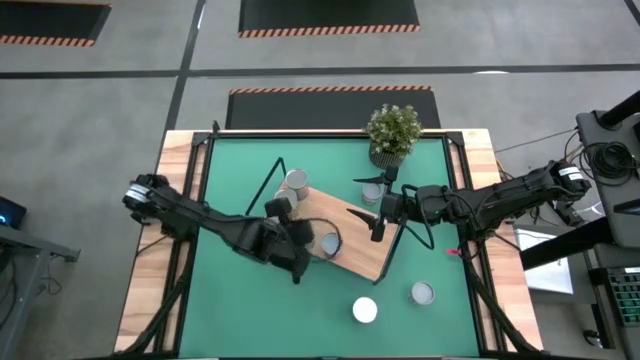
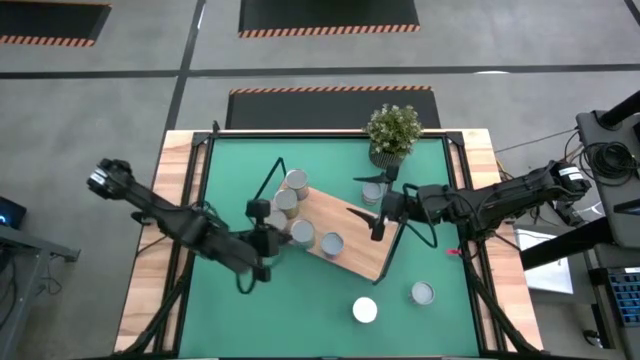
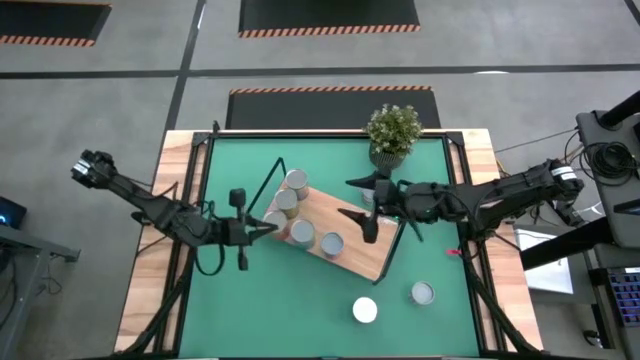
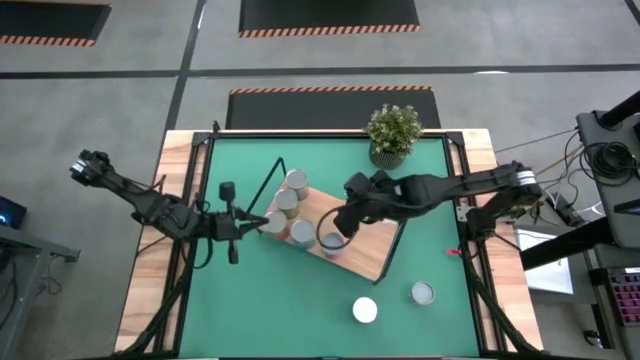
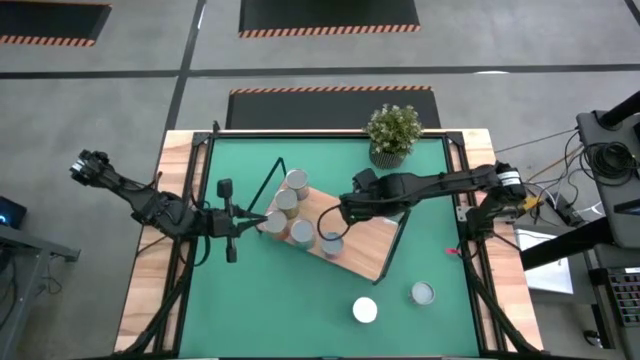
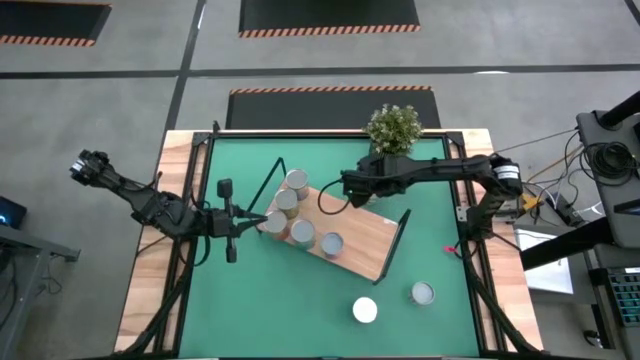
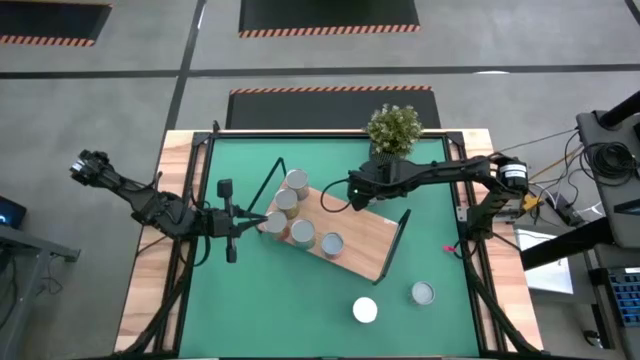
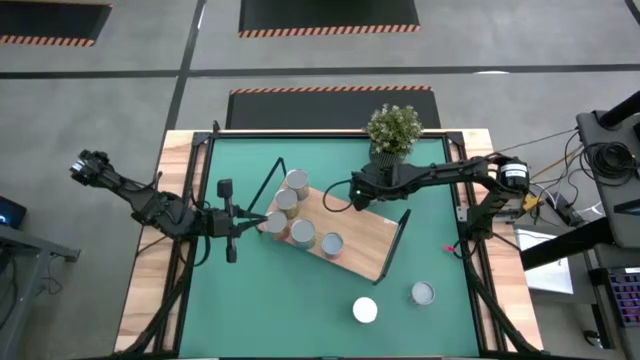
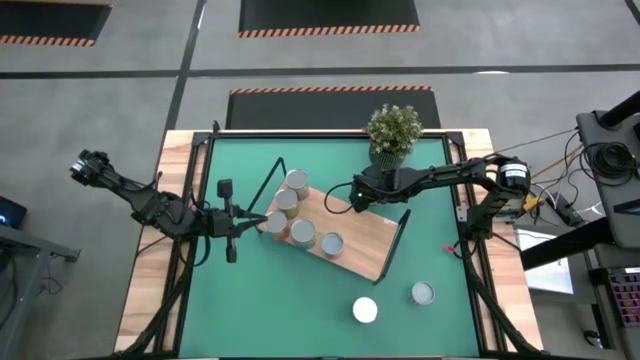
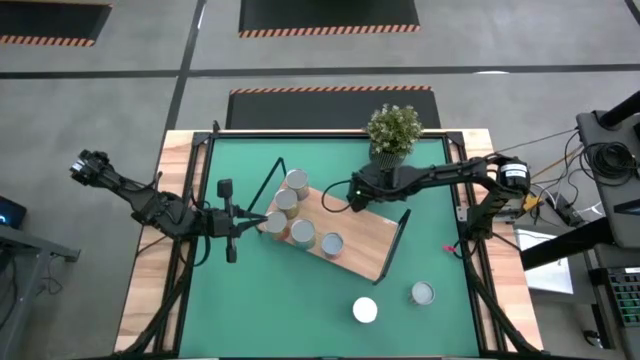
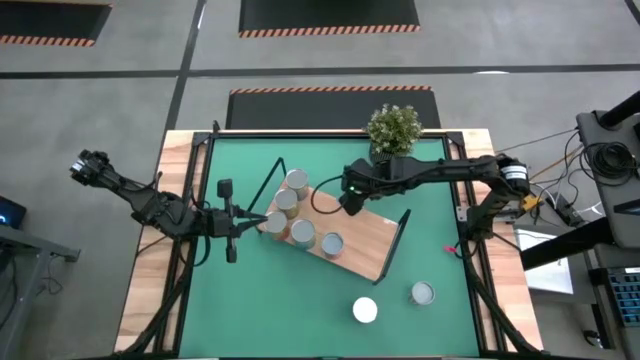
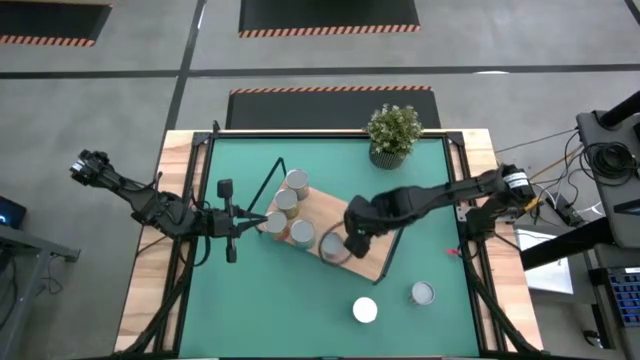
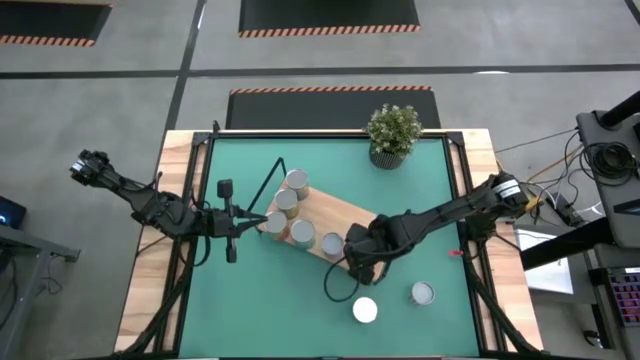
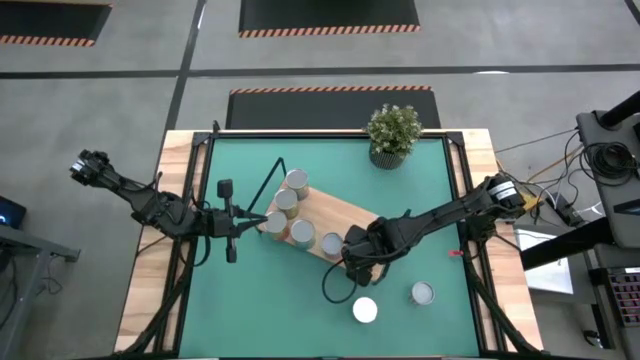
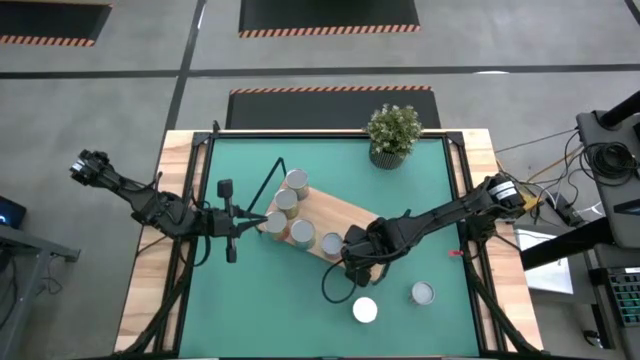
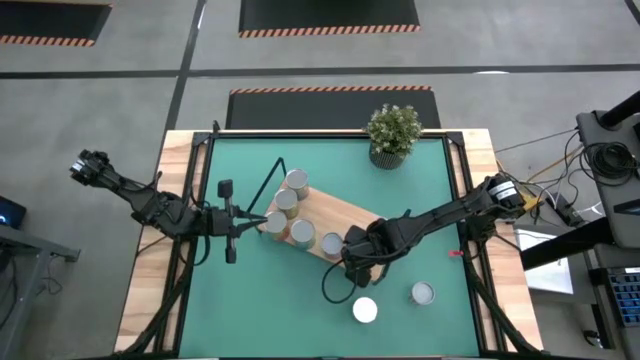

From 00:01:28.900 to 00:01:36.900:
Task: Pick and place cans onto a shelf
Put the small canned oranges on the shelf

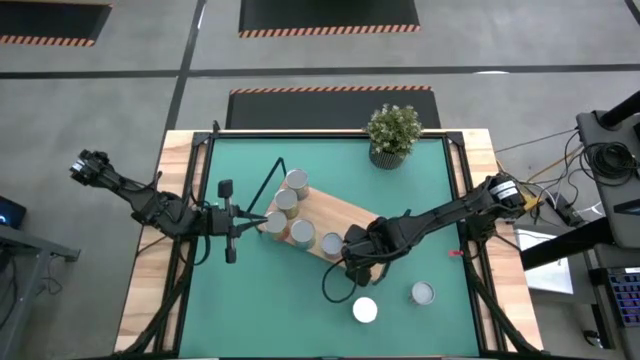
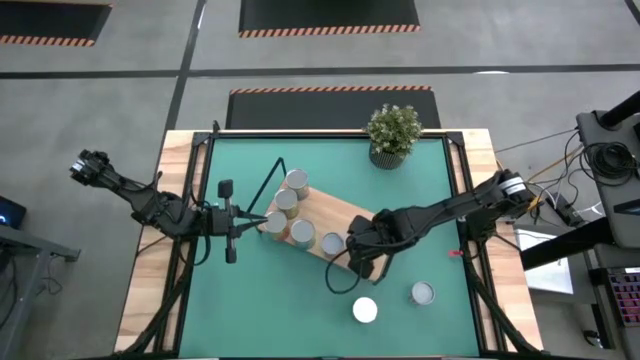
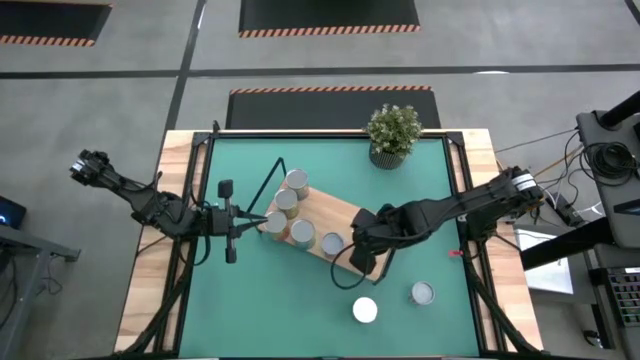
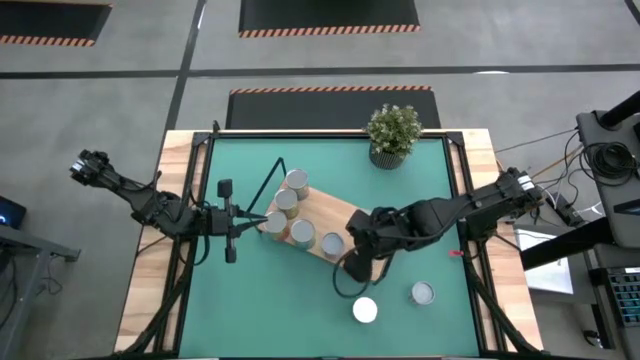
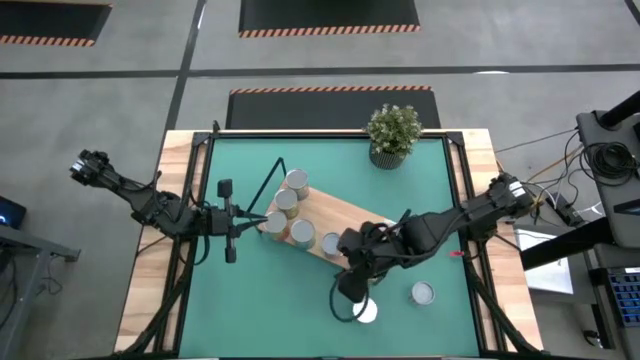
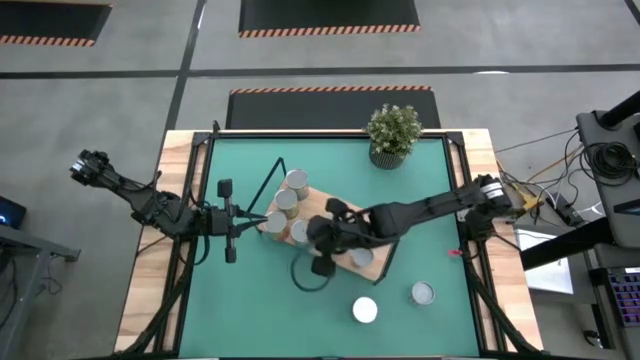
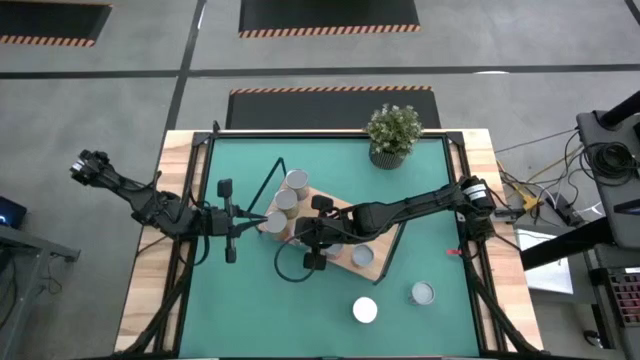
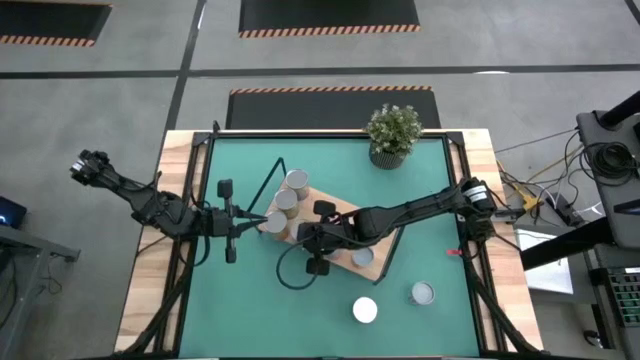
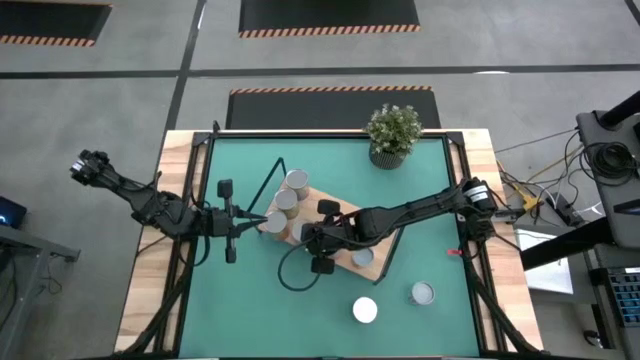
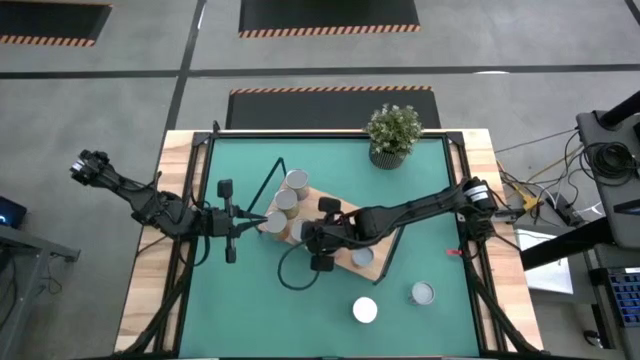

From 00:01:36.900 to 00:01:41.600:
Adjust the canned cherries on the shelf

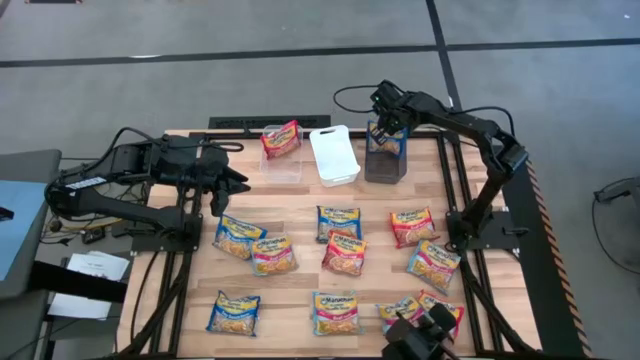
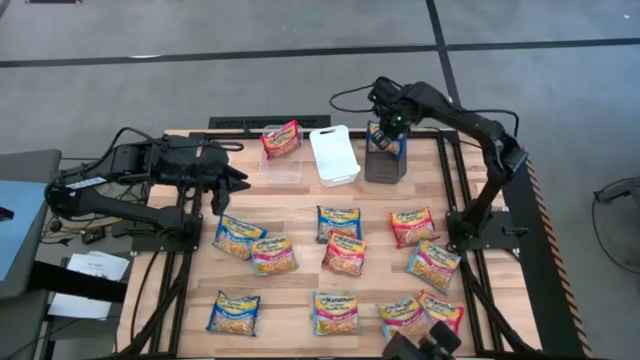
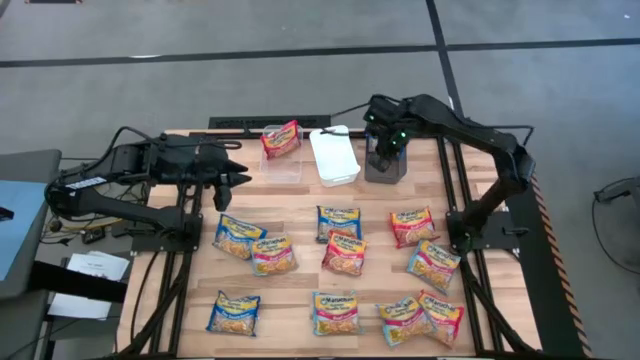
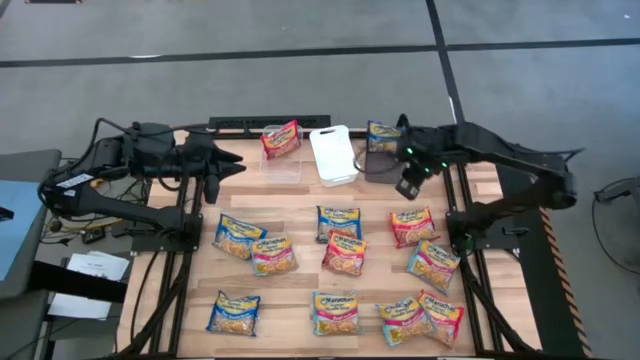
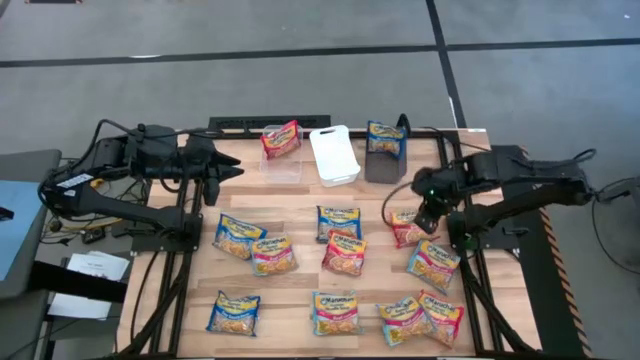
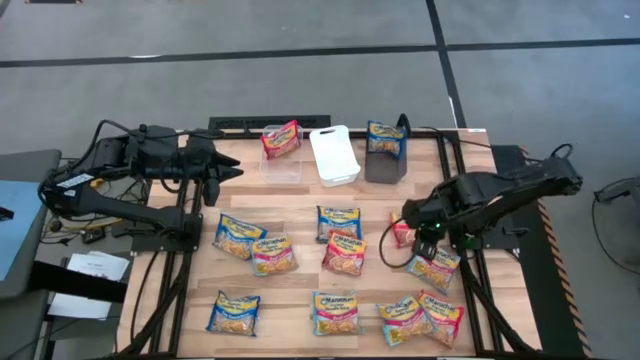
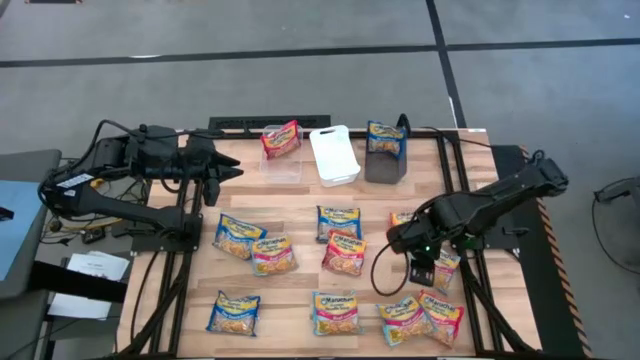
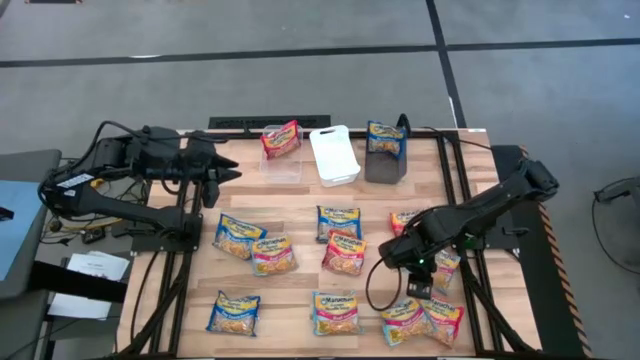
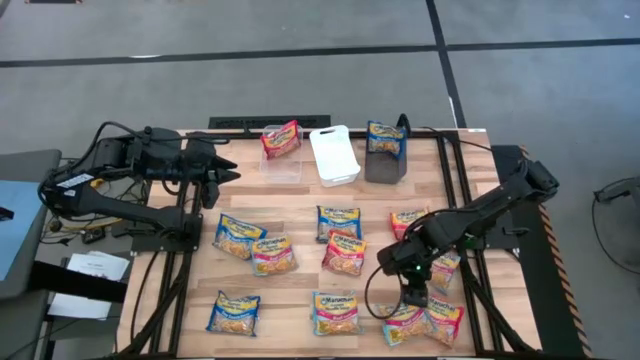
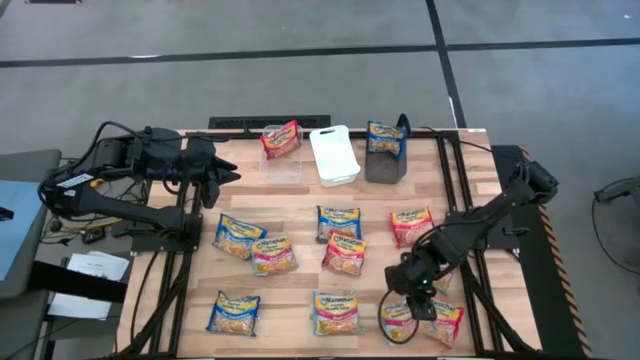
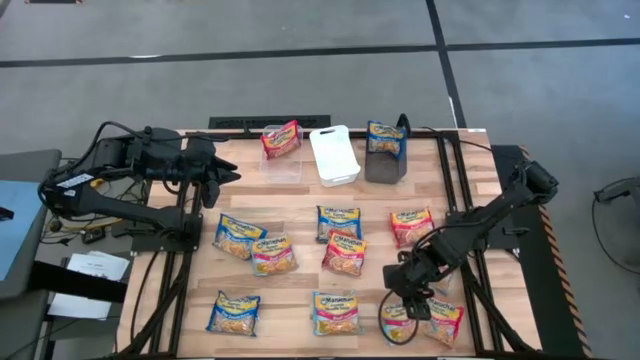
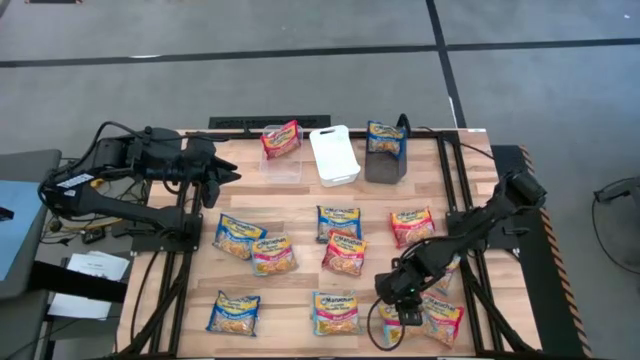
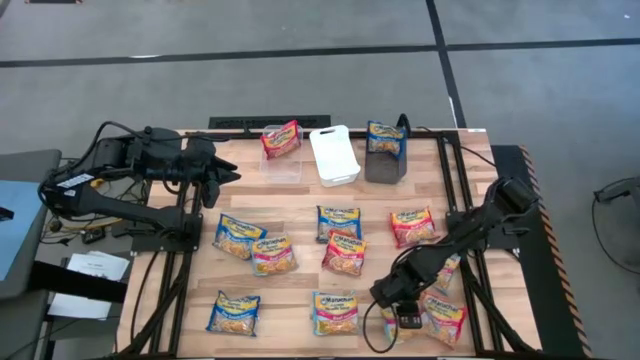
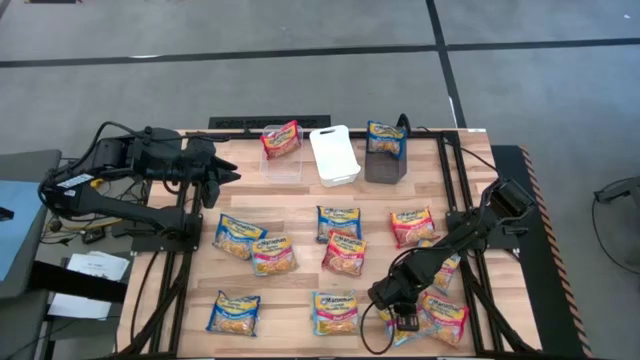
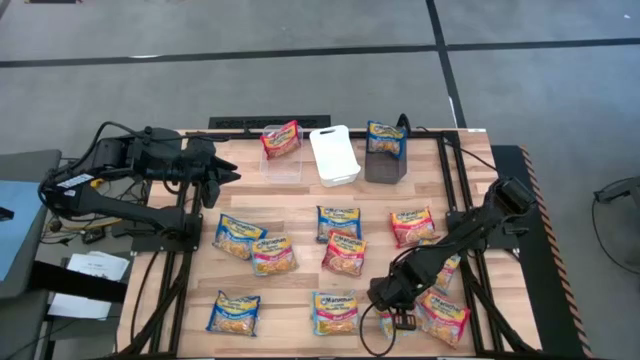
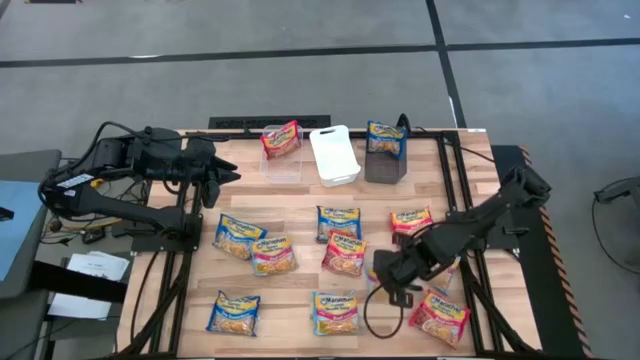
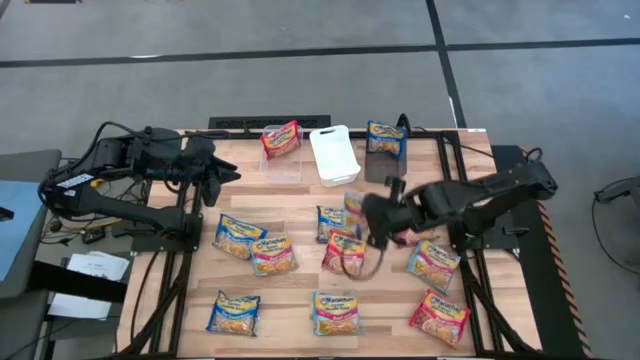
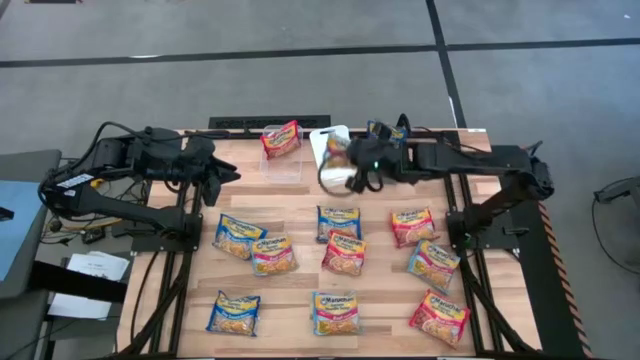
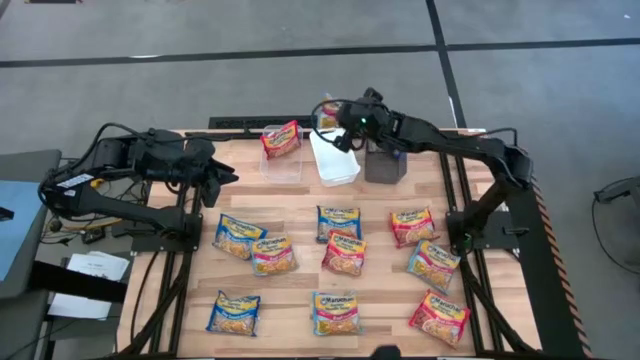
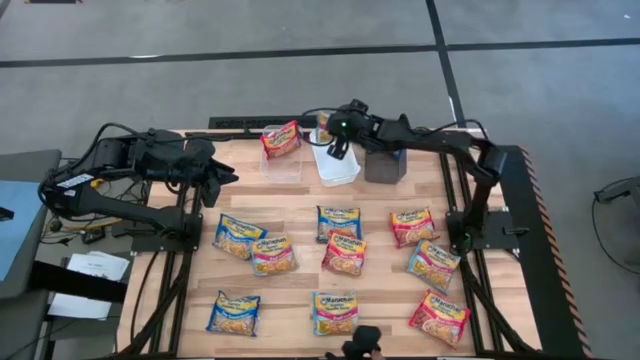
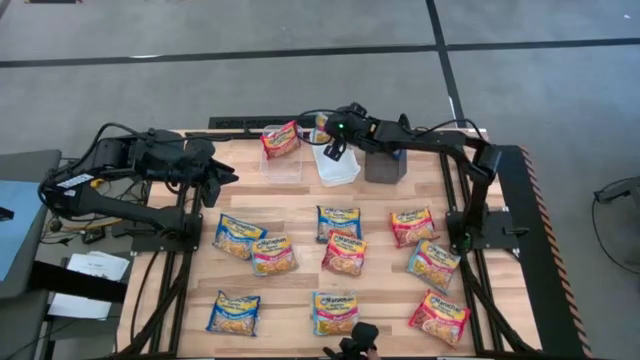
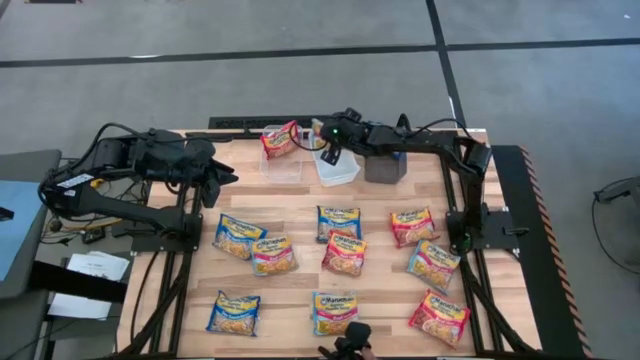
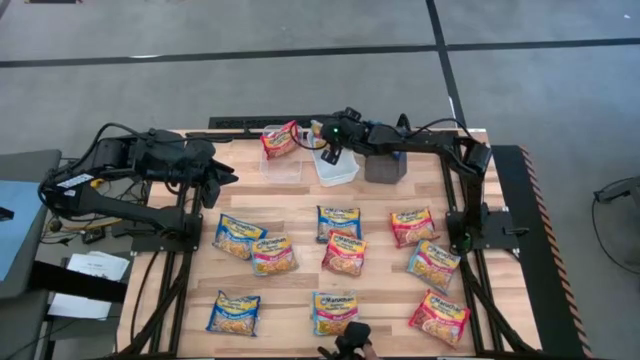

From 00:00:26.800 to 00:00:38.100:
Task: Sort Maruchan noodles
Put the light blue noodle pack into the white bin
